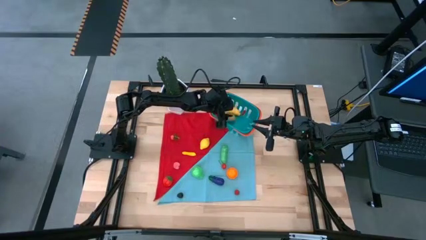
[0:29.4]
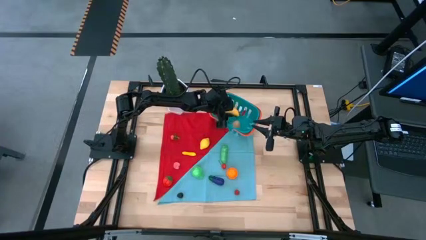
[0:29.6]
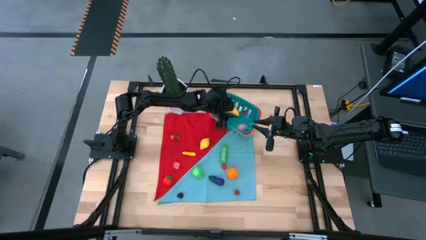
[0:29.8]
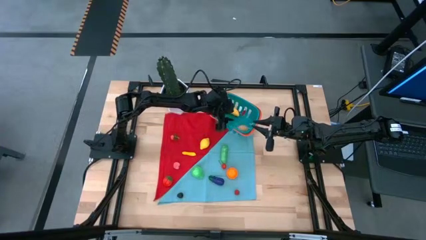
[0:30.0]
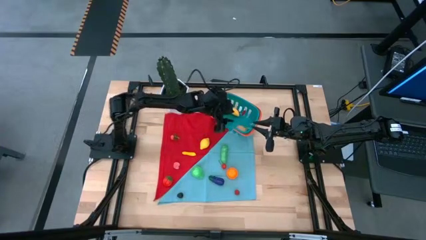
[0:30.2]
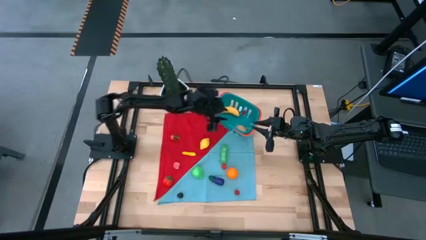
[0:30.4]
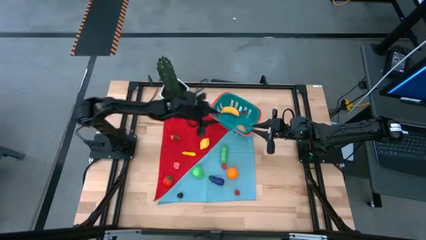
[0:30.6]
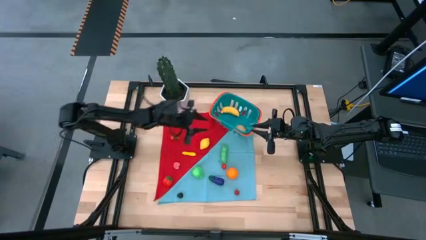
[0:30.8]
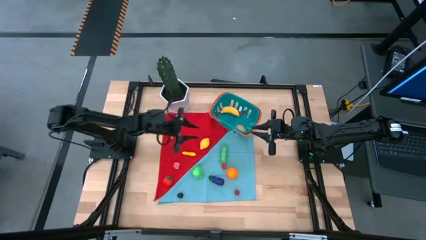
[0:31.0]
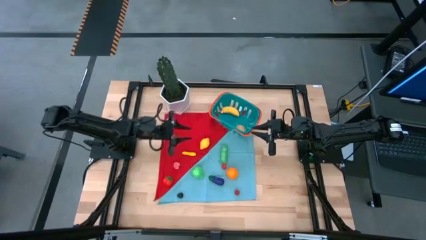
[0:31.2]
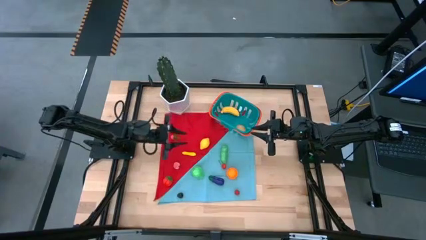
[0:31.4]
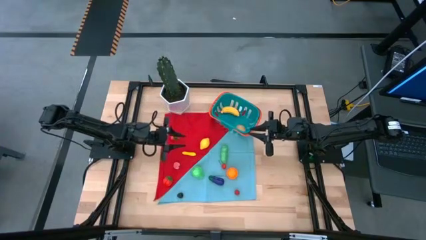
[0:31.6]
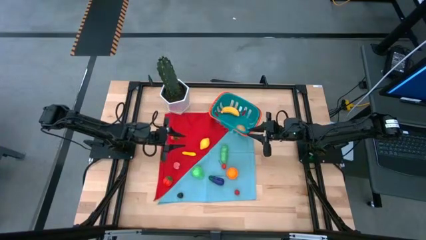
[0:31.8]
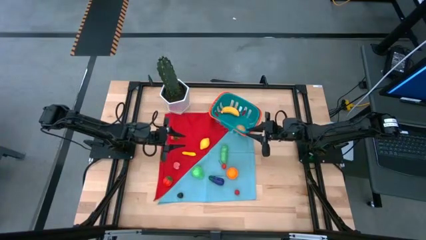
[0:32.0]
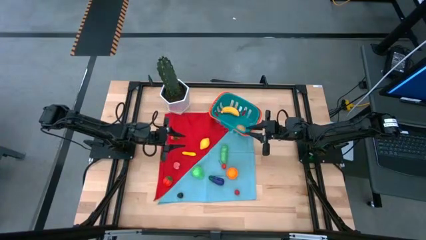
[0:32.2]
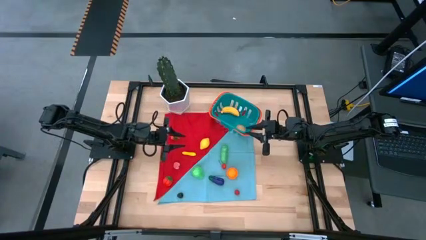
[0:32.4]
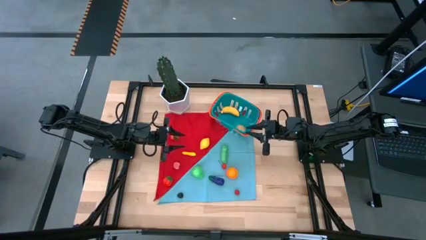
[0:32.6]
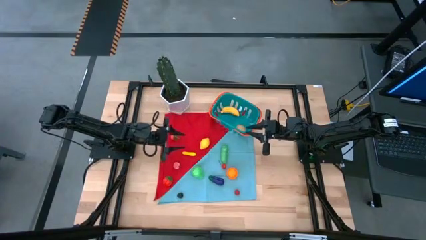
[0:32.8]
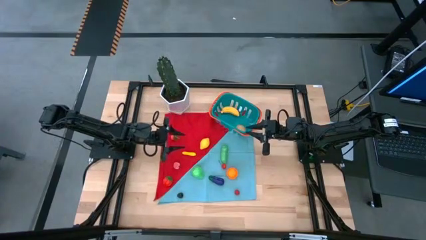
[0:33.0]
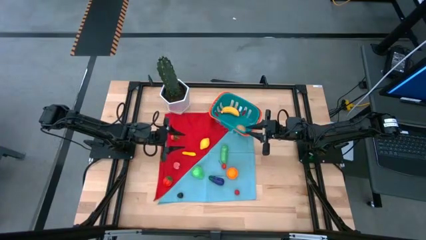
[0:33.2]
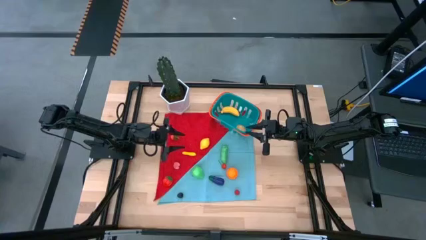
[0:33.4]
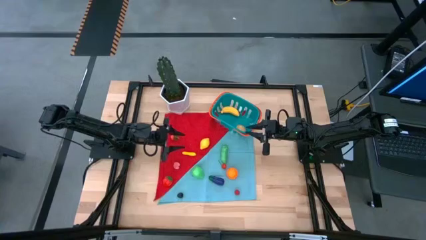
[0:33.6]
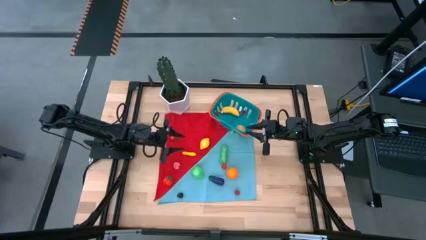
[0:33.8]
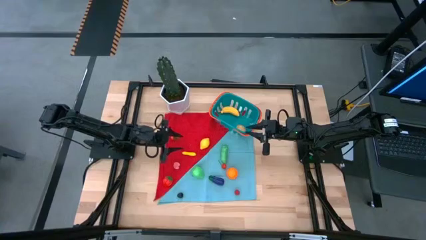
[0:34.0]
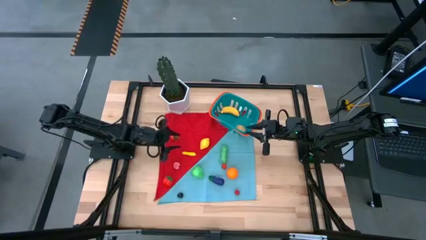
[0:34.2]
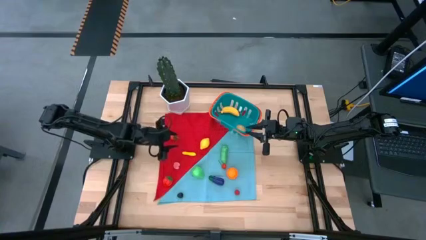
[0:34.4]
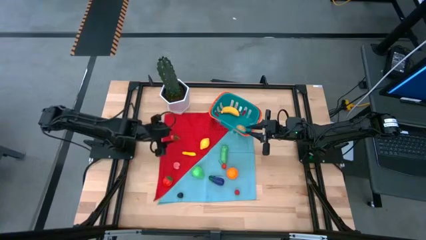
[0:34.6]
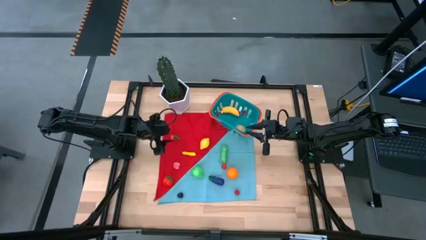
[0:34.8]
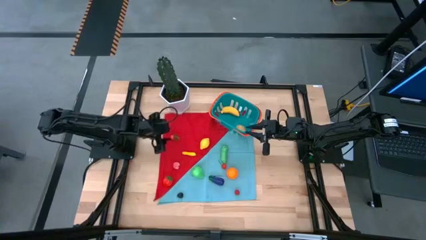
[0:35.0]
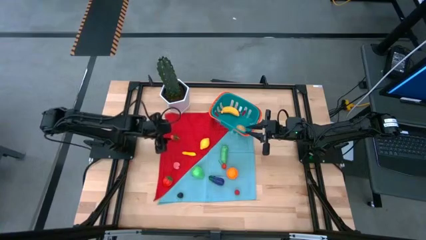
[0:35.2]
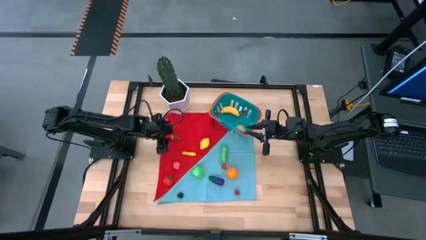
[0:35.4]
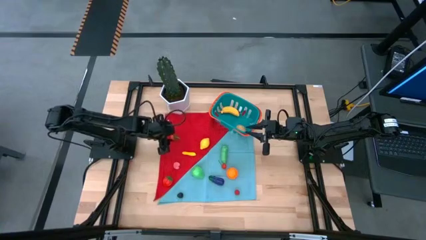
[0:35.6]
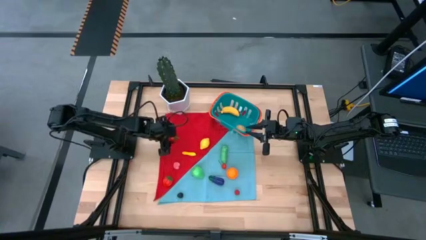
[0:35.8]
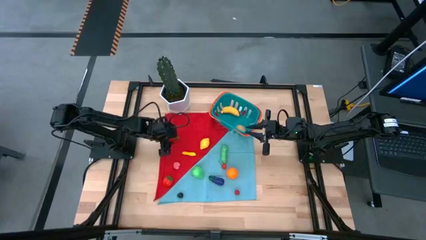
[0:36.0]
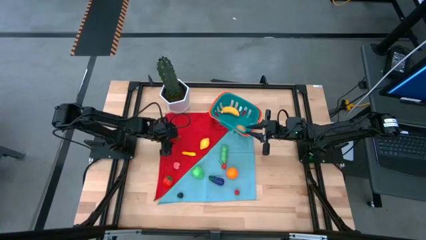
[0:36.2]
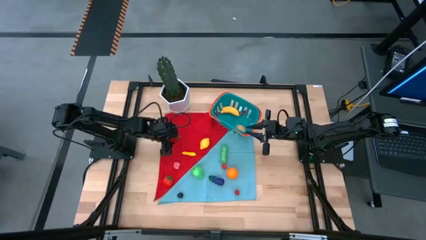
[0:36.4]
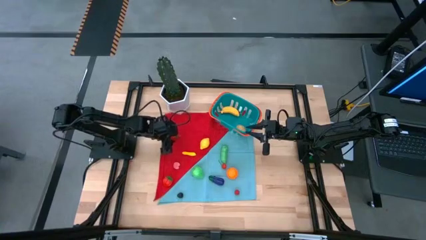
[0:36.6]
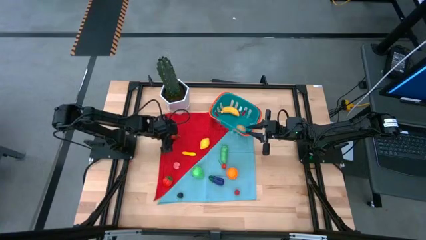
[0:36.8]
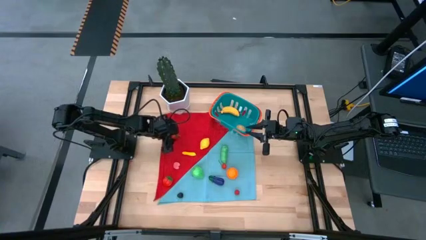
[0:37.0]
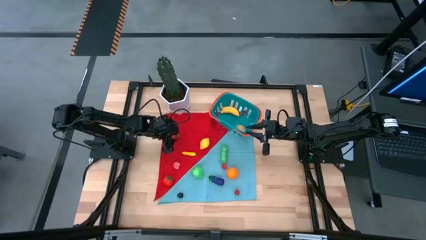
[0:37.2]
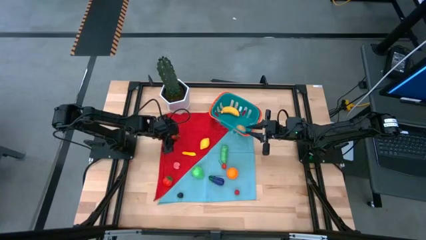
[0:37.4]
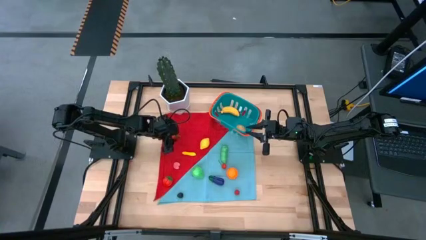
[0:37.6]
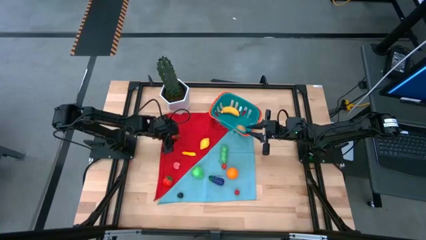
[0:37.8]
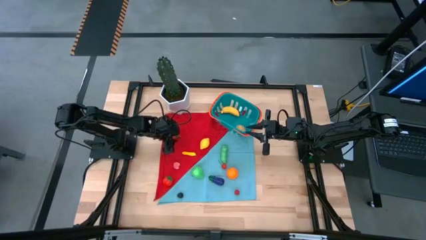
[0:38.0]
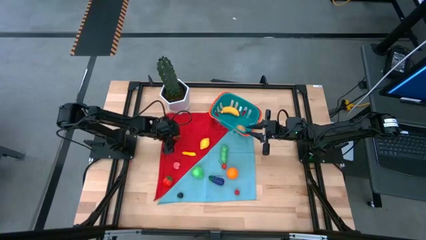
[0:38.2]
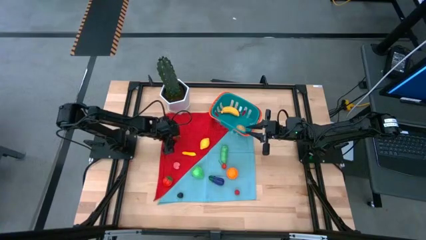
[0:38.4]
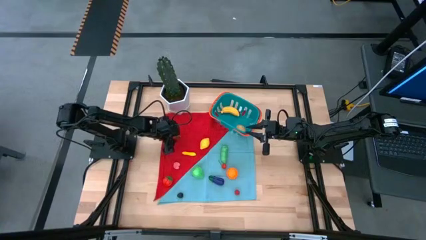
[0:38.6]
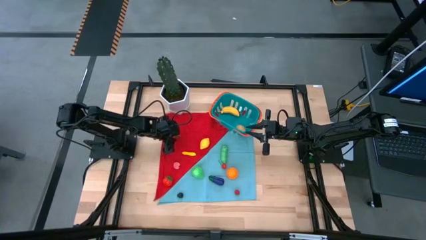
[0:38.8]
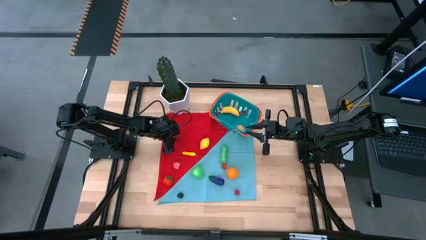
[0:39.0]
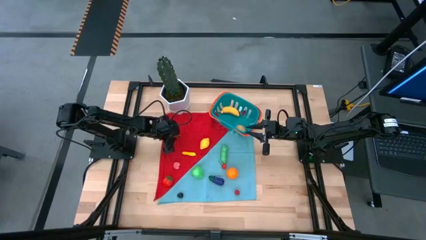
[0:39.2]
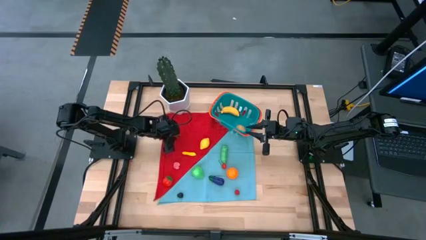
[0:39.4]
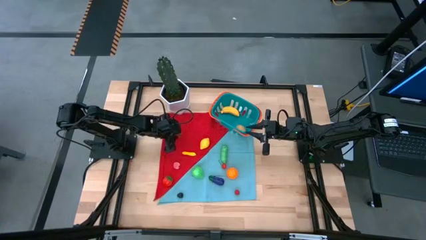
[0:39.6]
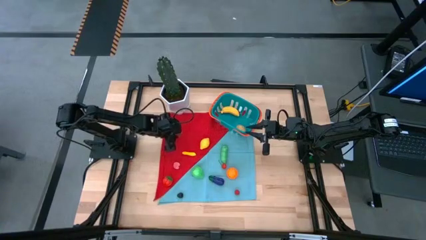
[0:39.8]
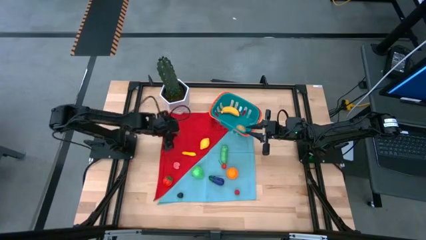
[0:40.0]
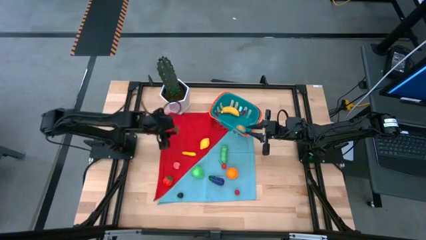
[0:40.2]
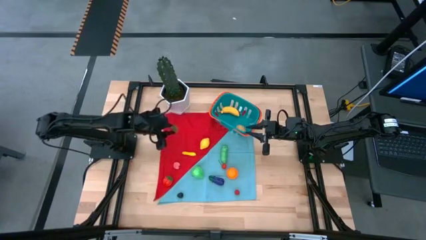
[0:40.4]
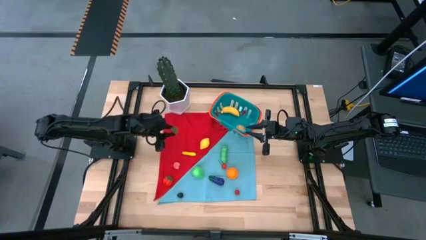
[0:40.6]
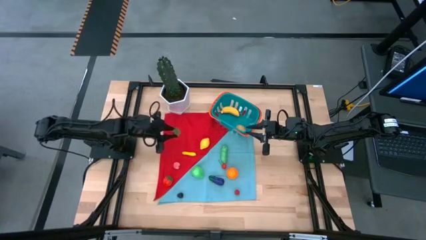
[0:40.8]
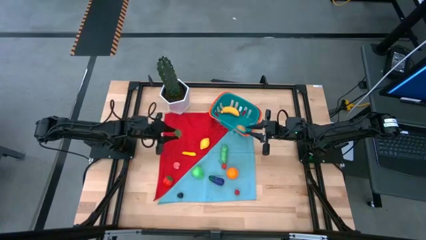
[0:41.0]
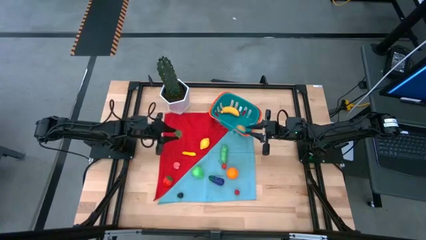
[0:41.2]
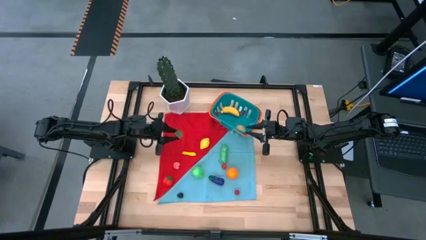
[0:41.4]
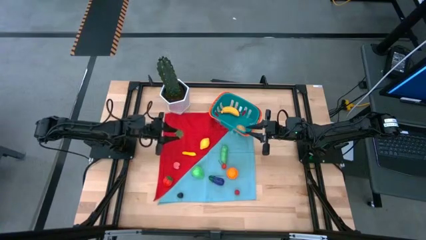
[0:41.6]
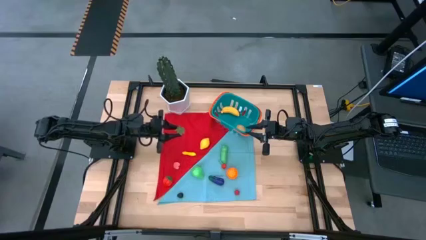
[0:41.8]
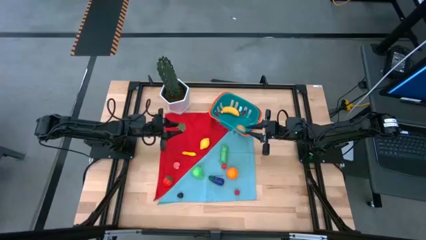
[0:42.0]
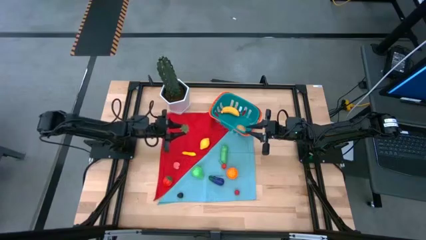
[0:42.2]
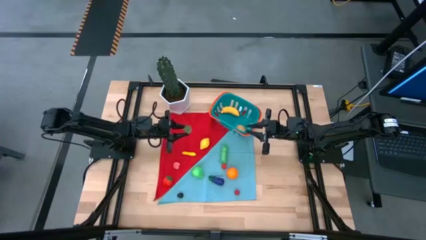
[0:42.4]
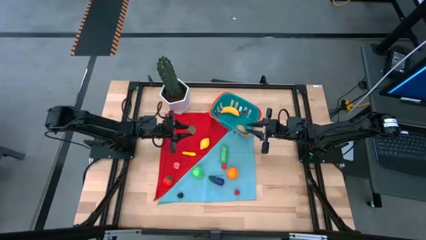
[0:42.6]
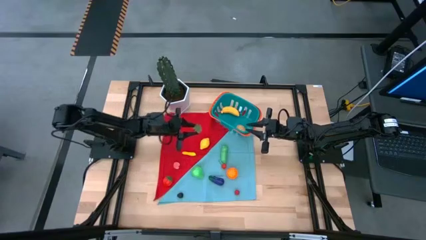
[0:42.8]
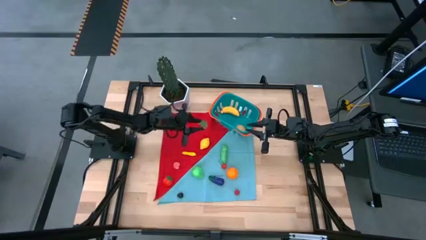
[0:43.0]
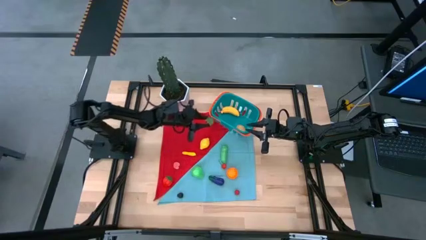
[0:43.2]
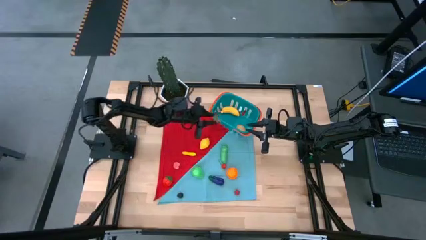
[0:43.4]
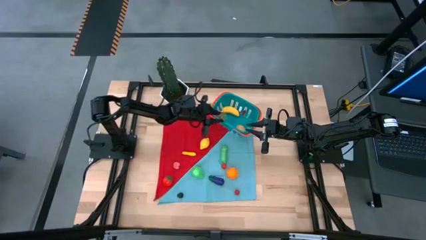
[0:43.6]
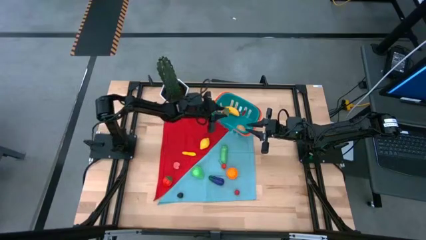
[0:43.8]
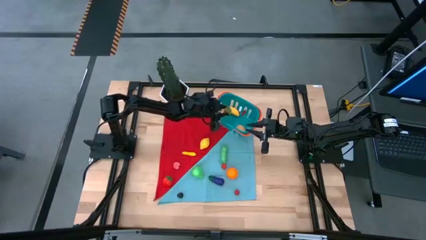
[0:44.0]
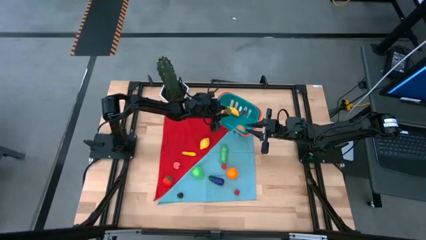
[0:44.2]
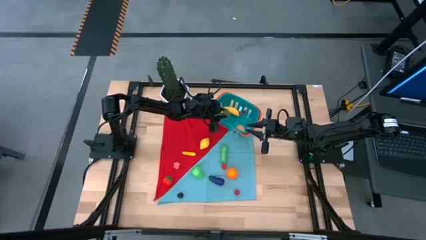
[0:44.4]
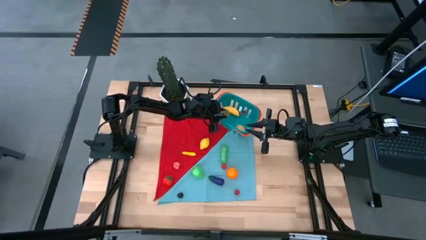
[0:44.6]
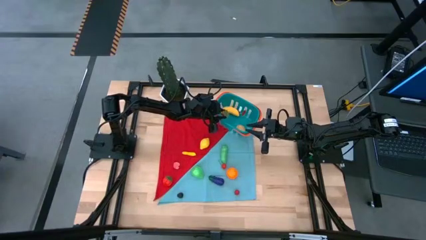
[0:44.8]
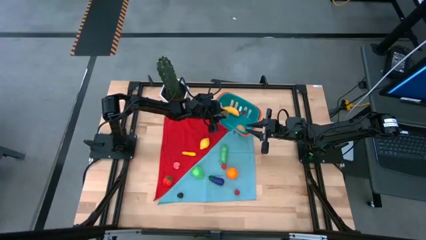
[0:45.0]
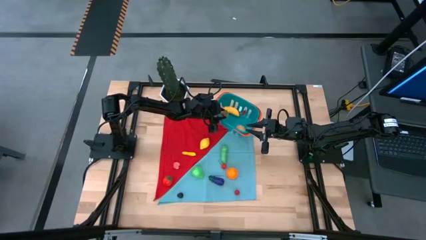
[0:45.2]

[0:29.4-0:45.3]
Task: Pick and placing Produce into tupperware
Put the top red strawberry into the blue basket
